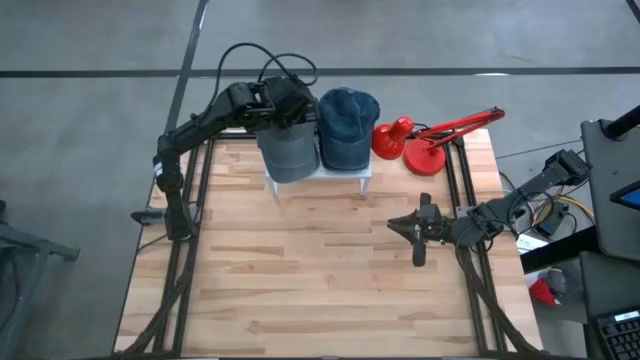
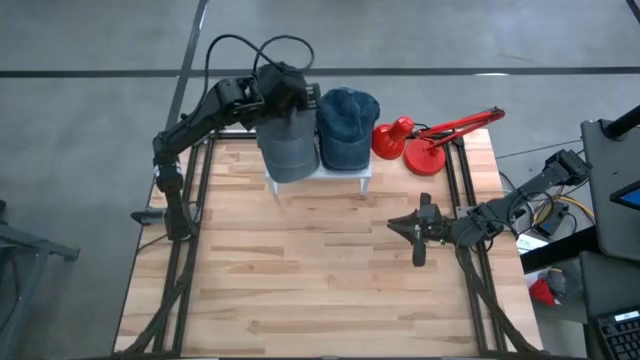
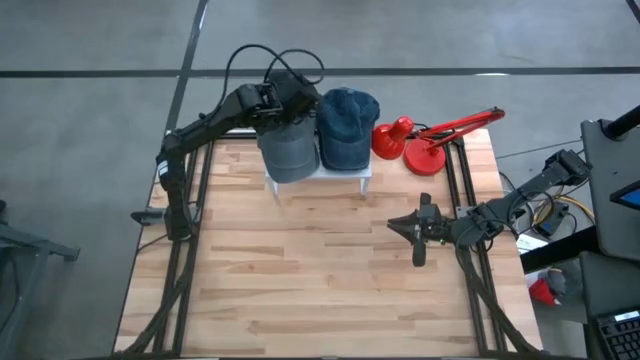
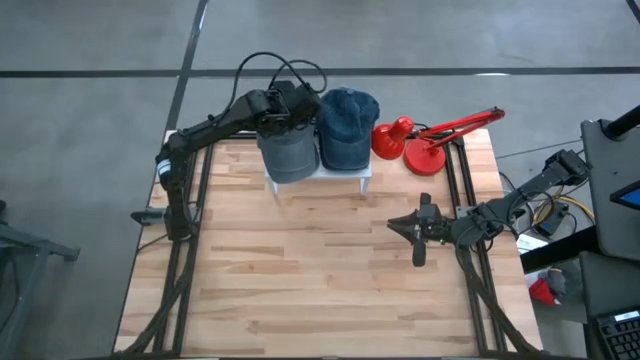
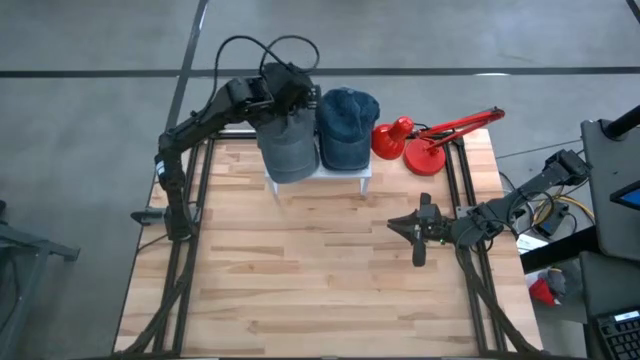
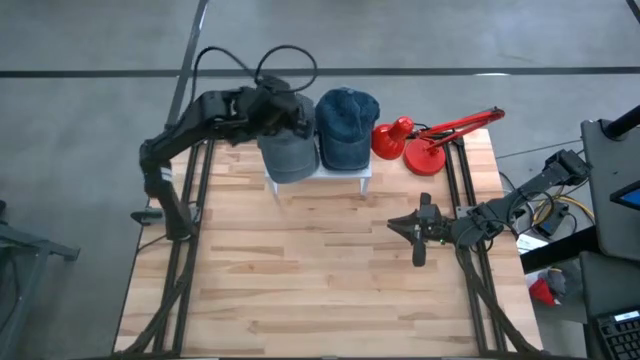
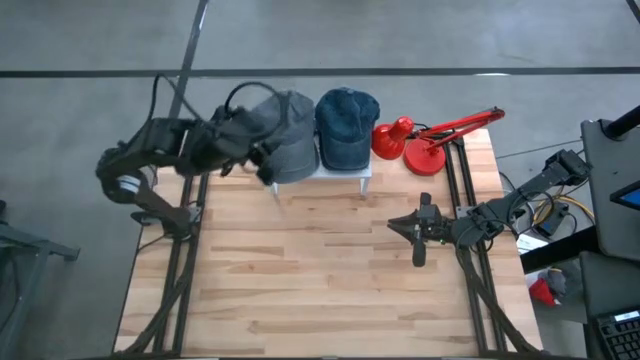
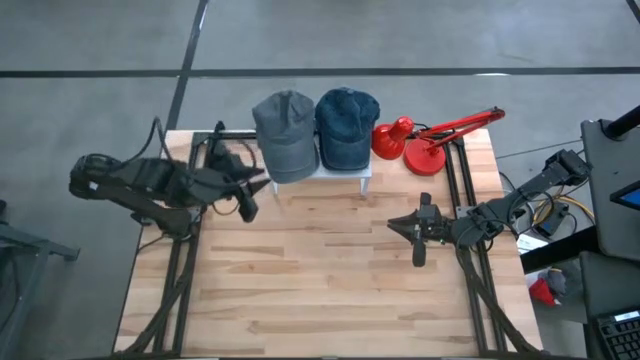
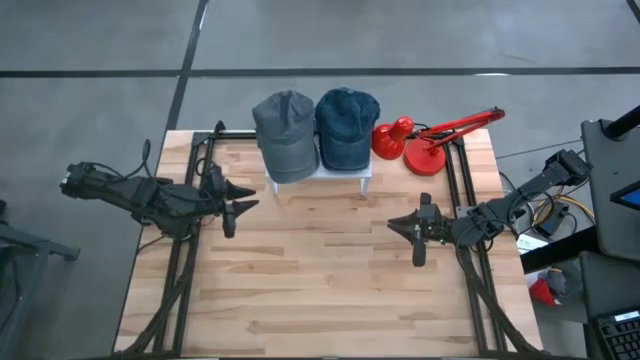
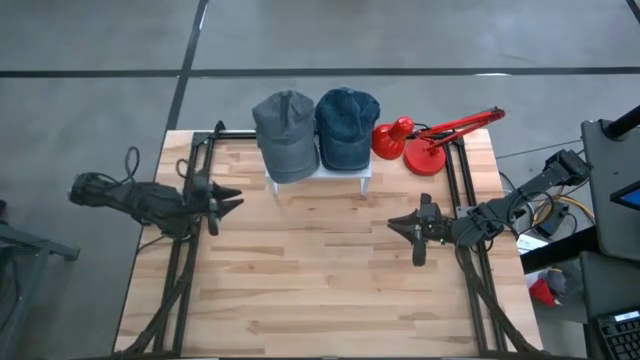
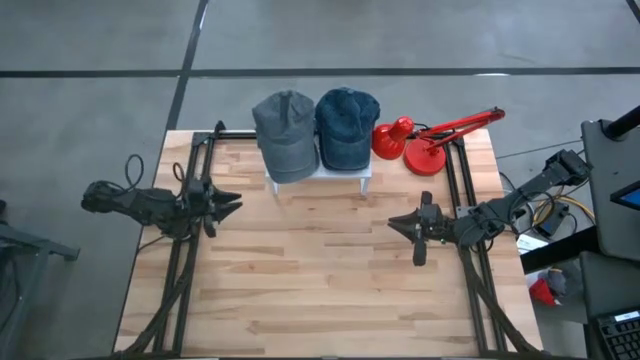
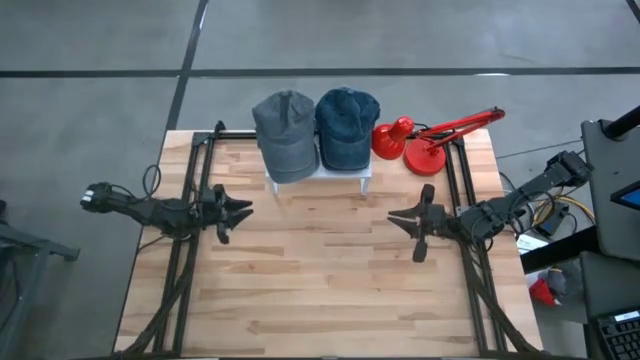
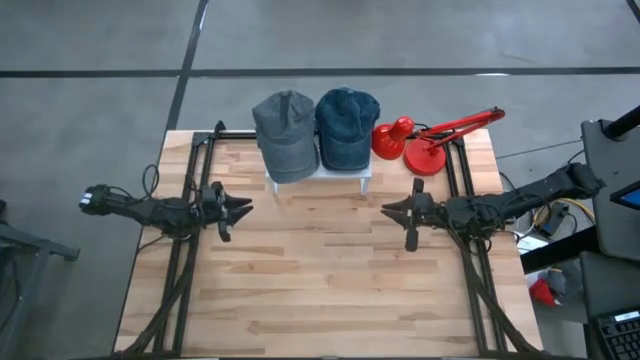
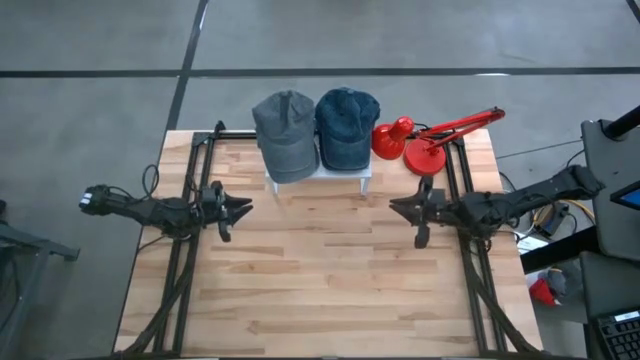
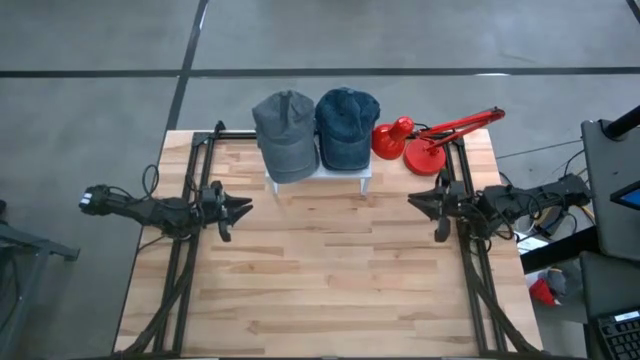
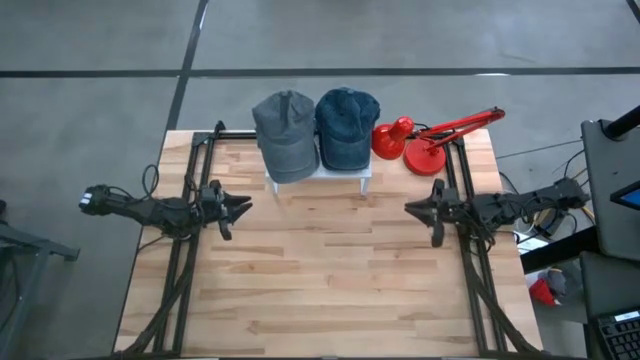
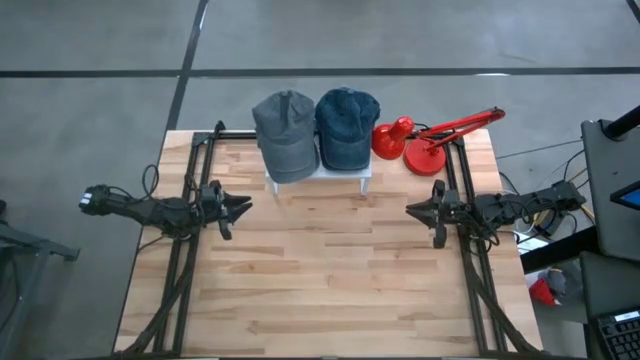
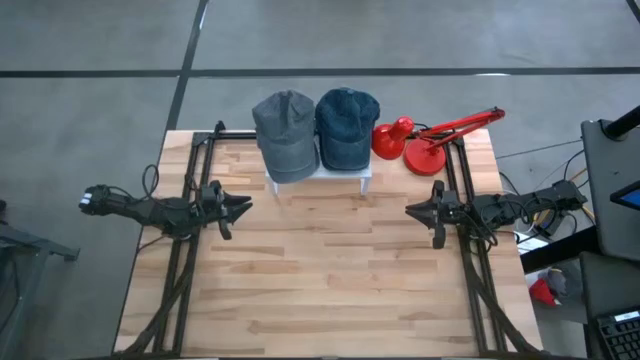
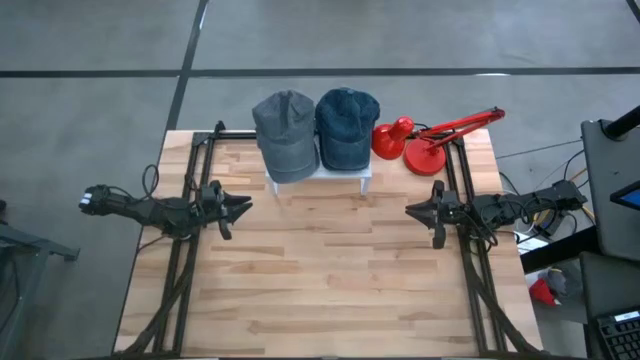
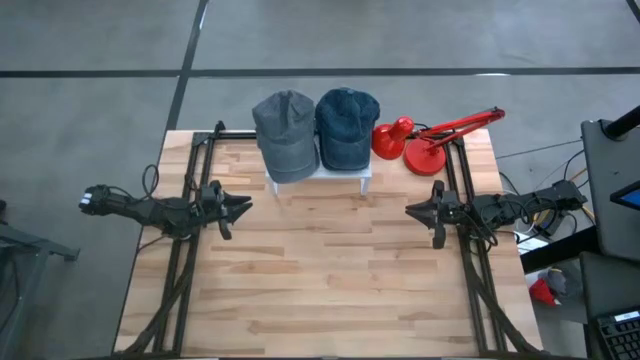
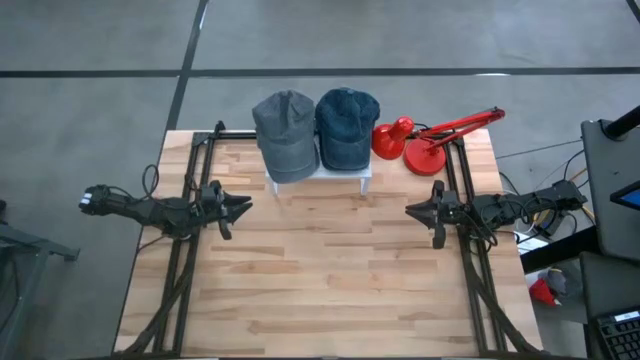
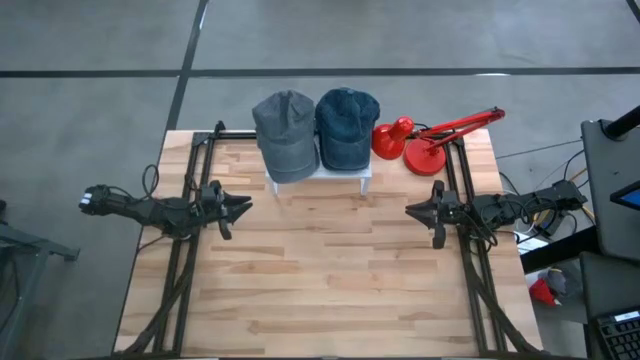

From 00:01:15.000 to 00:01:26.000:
Task: Pick & Place hat
Return to Home Position

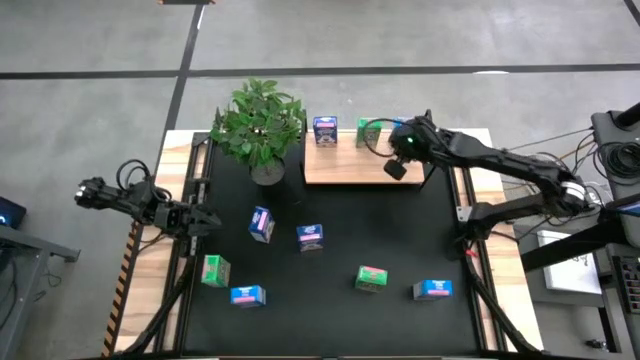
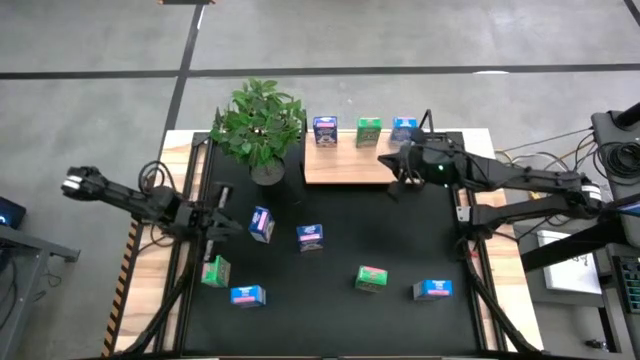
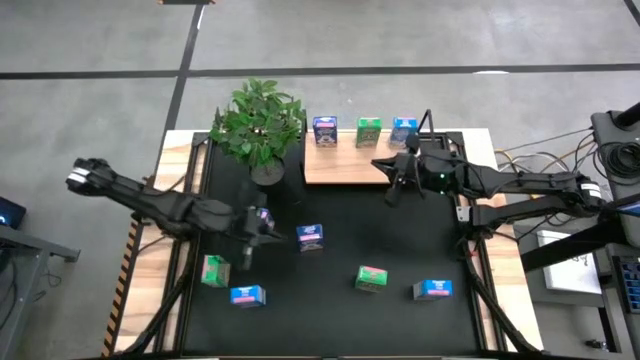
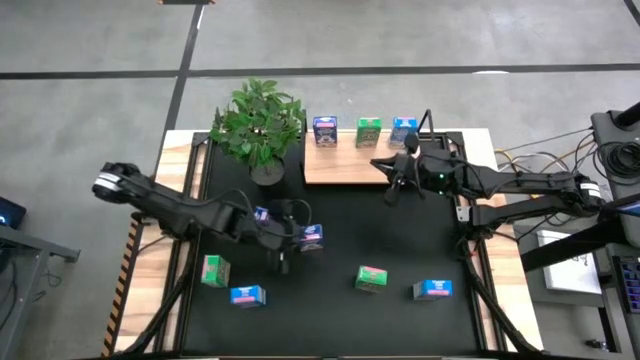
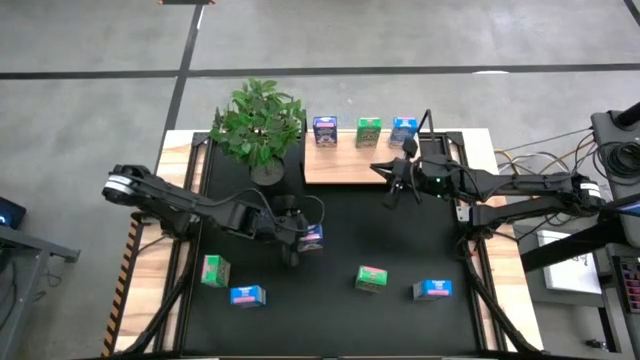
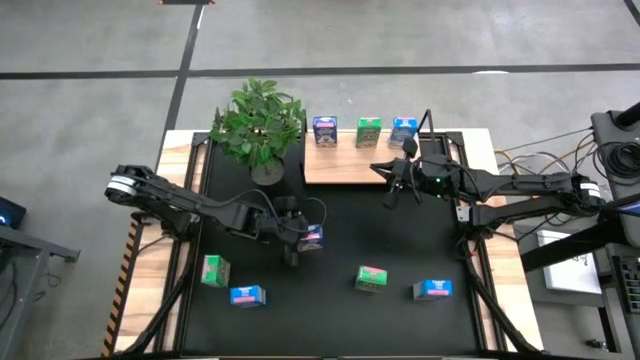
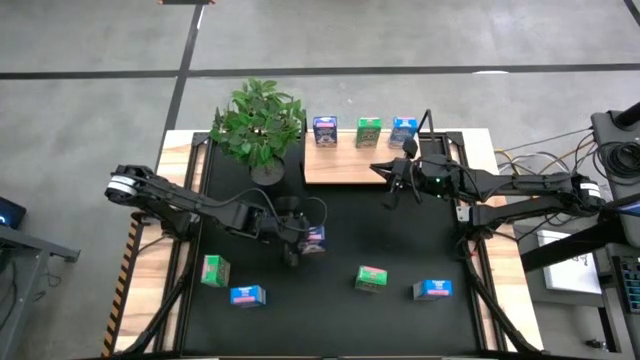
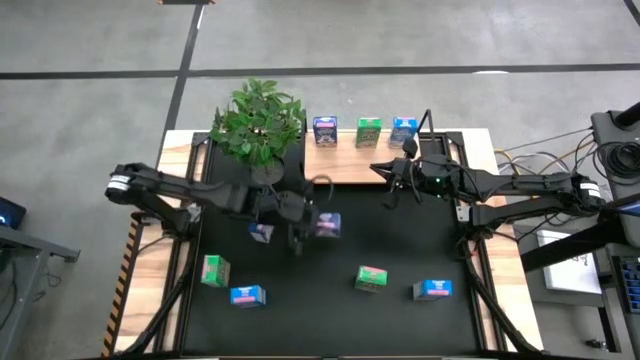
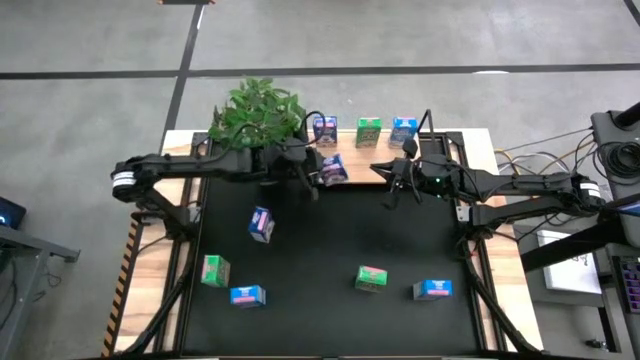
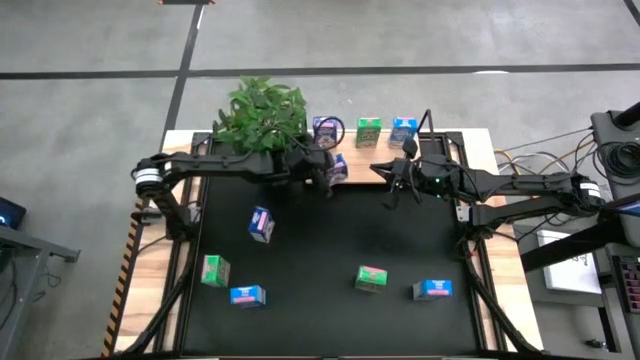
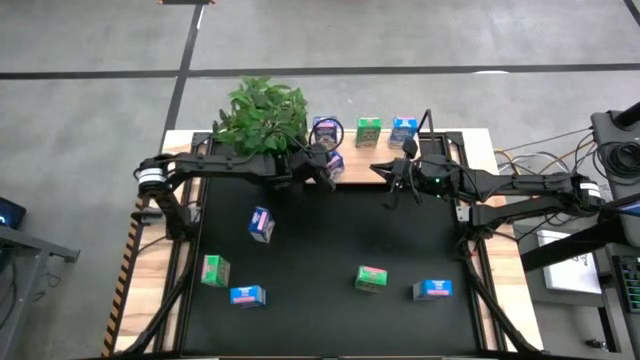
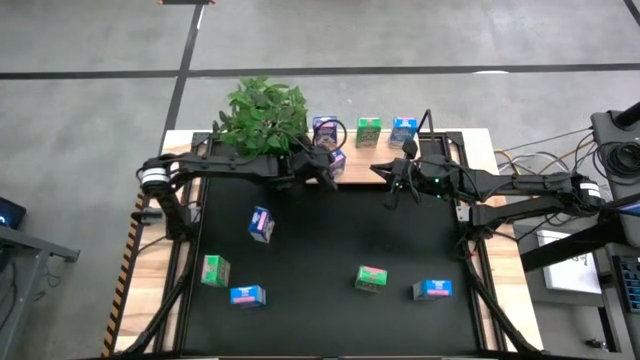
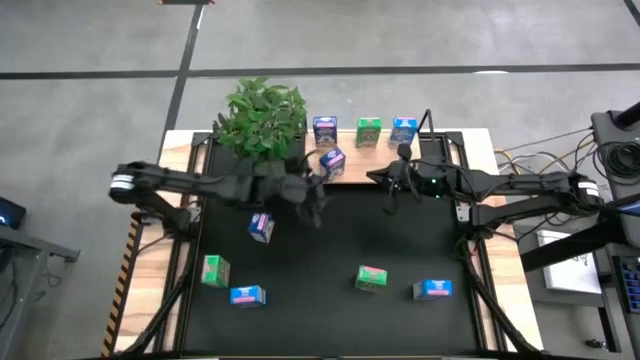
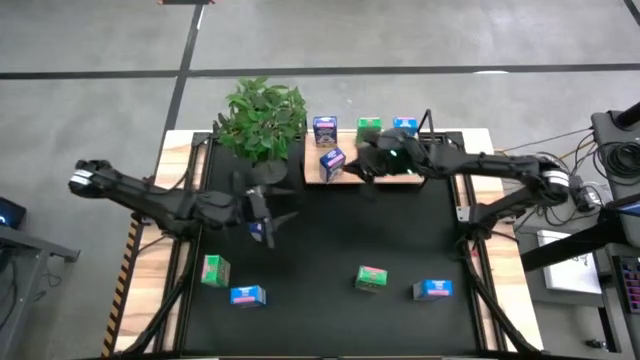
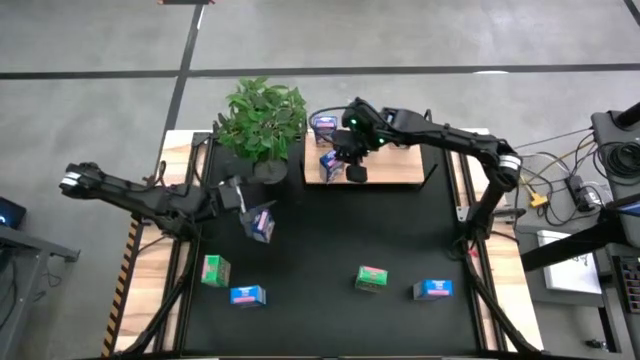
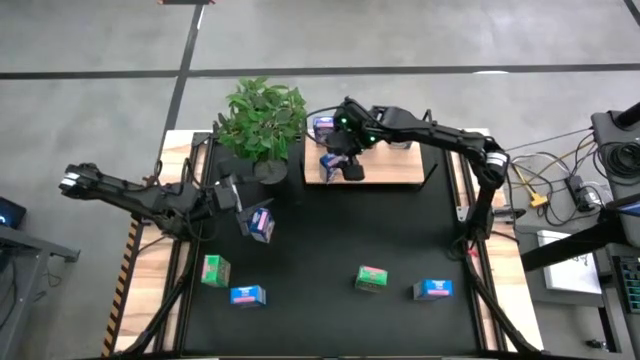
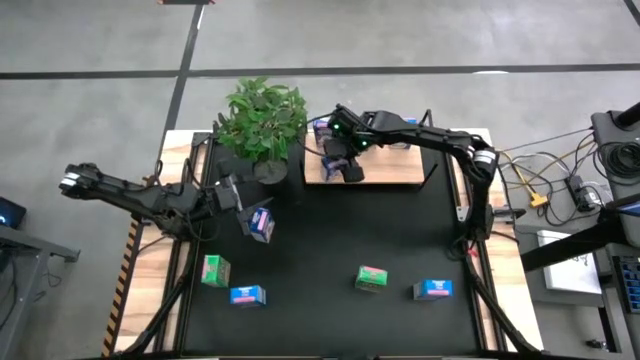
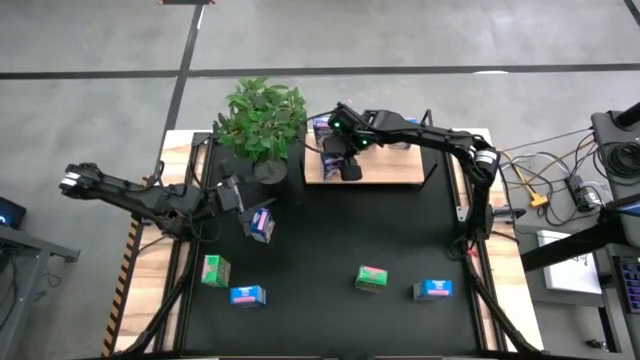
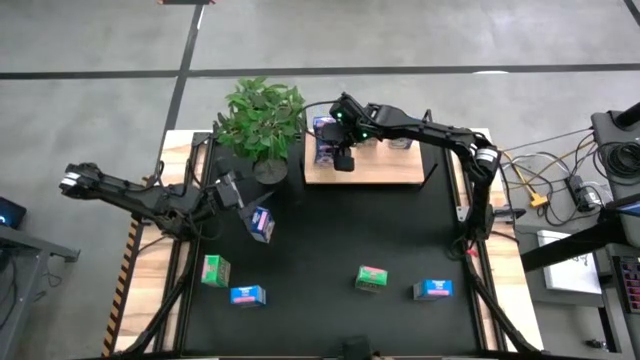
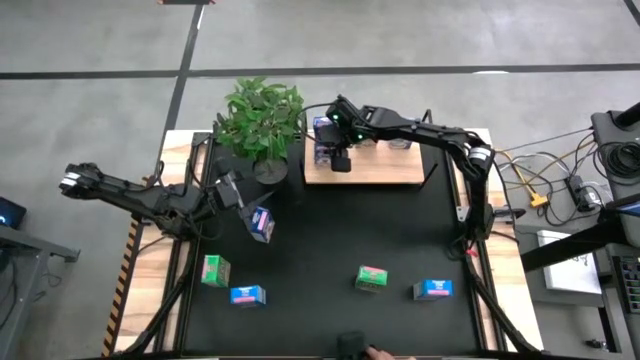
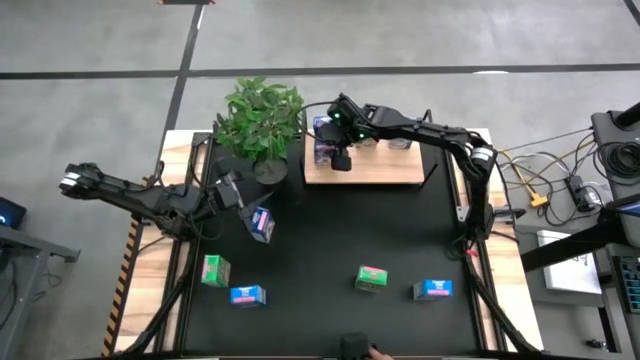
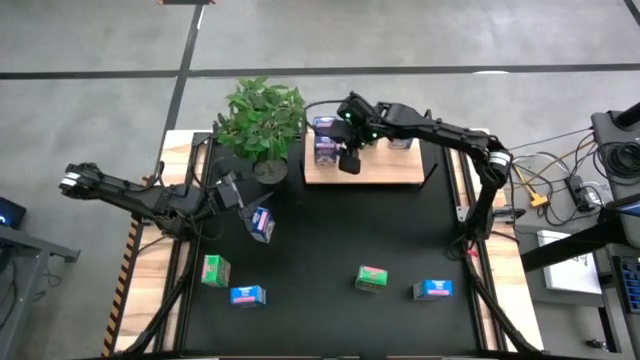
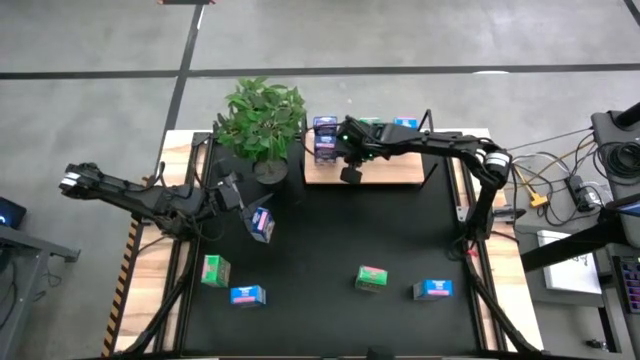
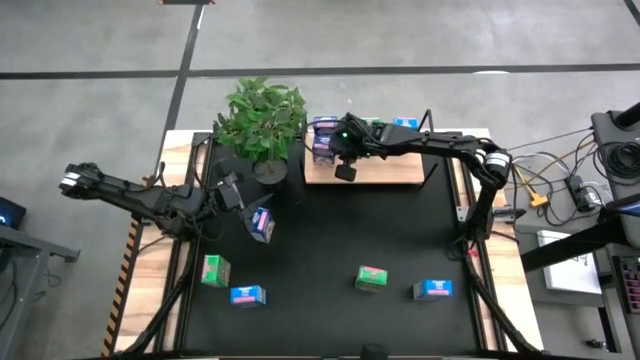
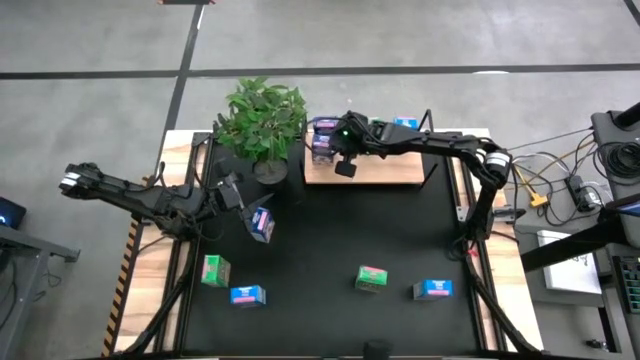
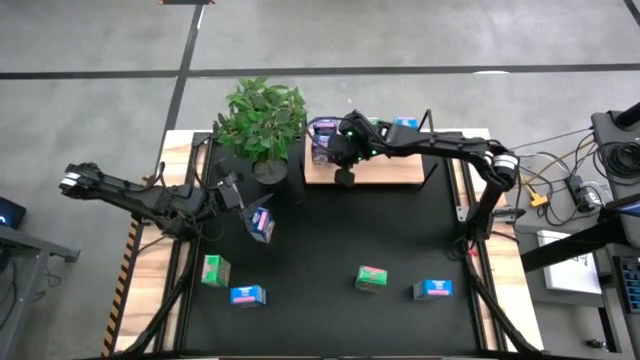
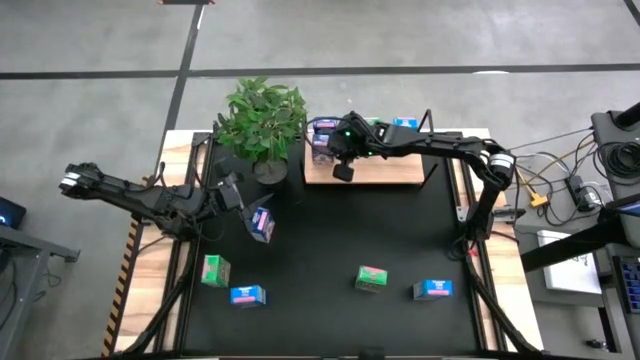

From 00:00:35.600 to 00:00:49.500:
Task: Stack cereal on shelf
Put the right dark blue cereal box on the shelf aligned with the other dark blue cereal box
